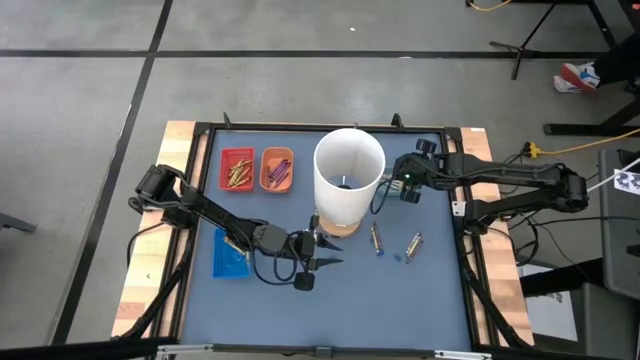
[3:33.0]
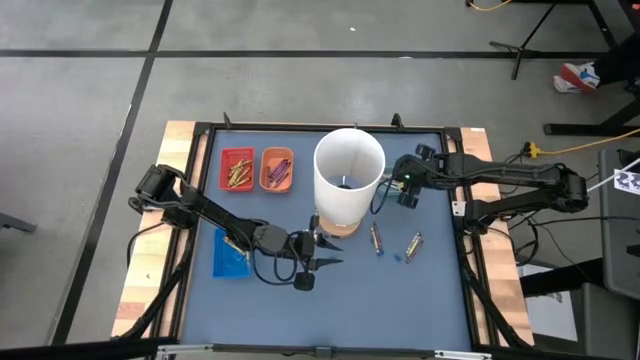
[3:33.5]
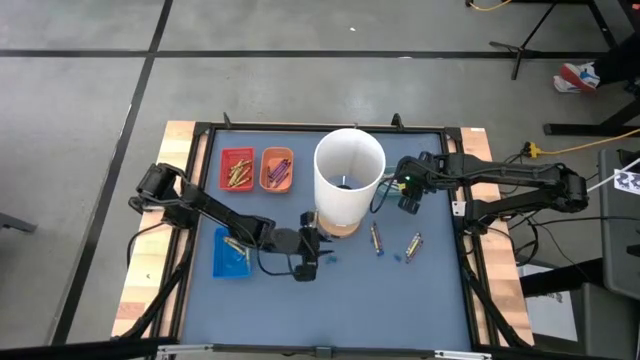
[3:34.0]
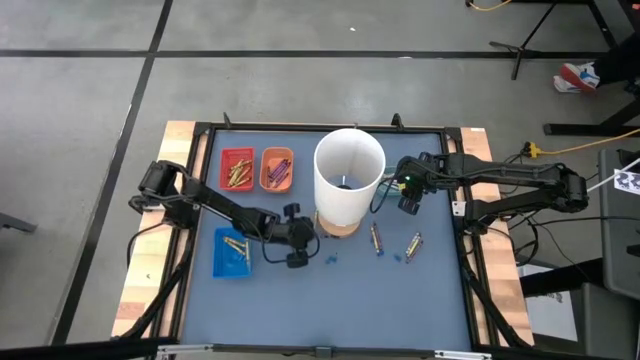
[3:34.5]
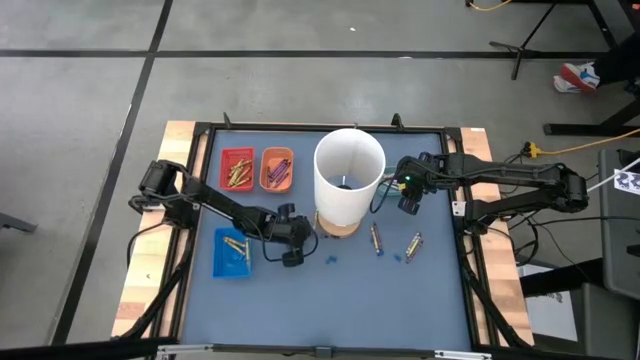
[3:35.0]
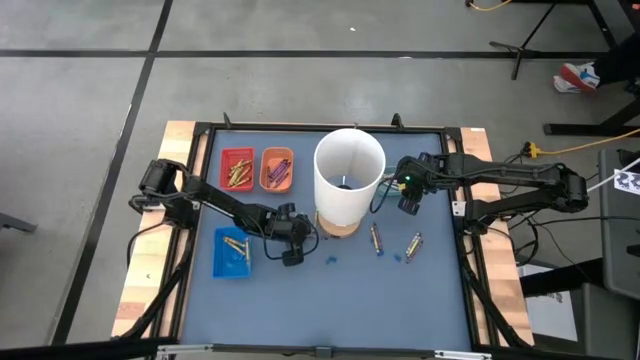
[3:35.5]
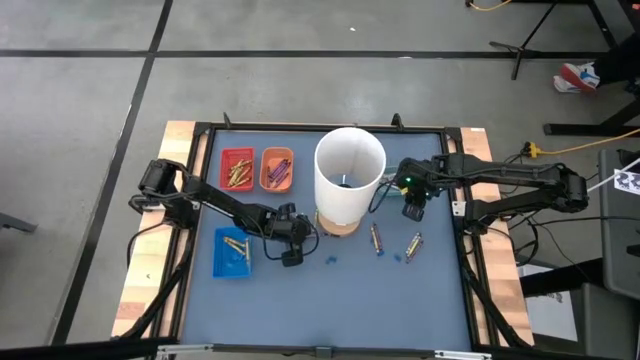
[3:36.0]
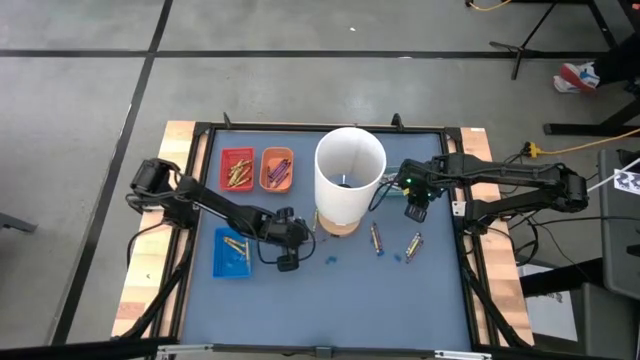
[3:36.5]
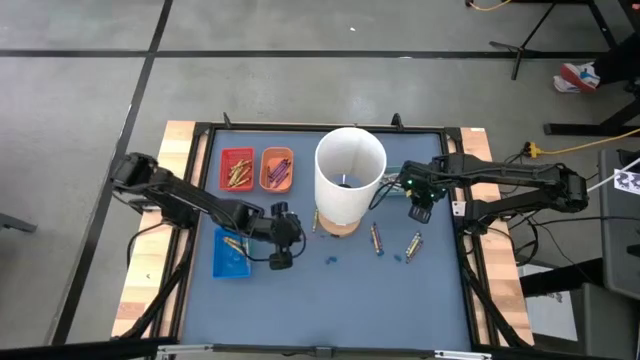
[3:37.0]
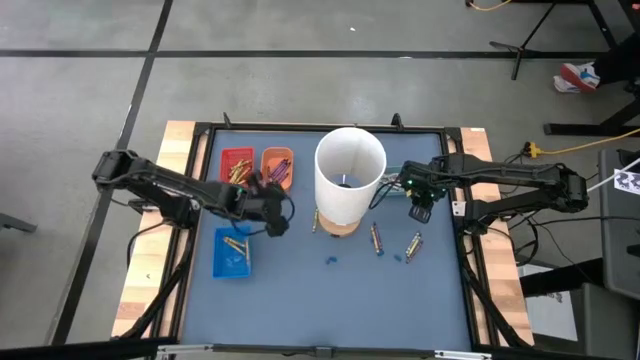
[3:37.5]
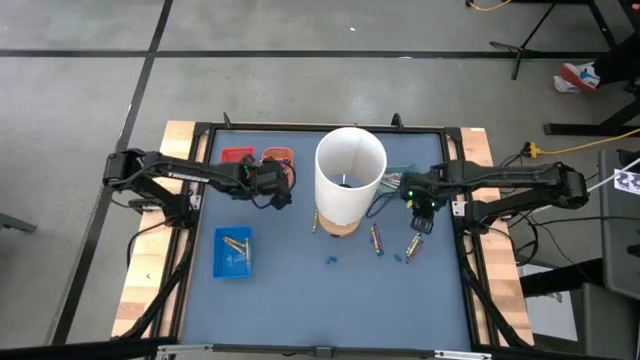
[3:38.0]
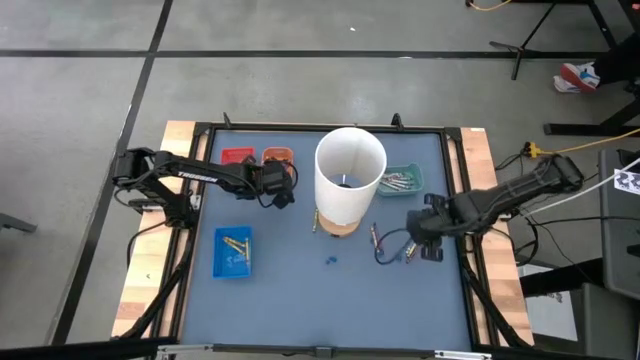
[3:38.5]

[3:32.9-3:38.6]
Task: Sort crayons
Put the violet crayon into the orange bin

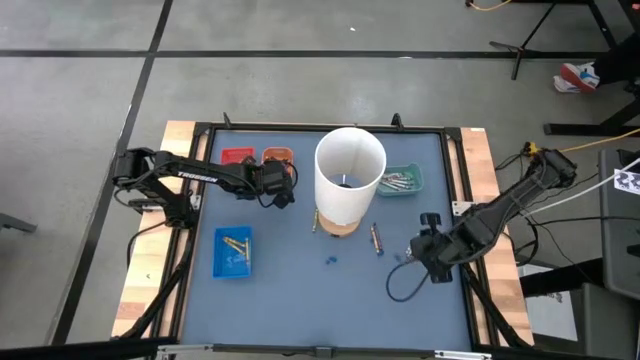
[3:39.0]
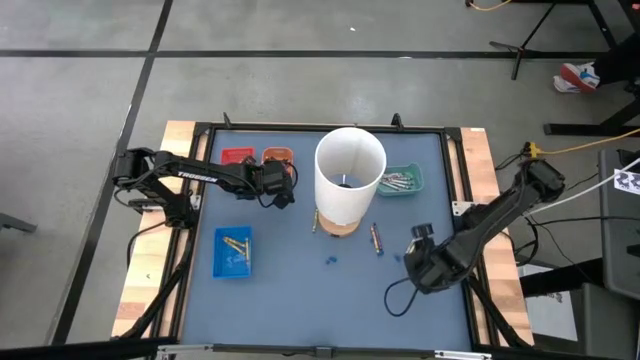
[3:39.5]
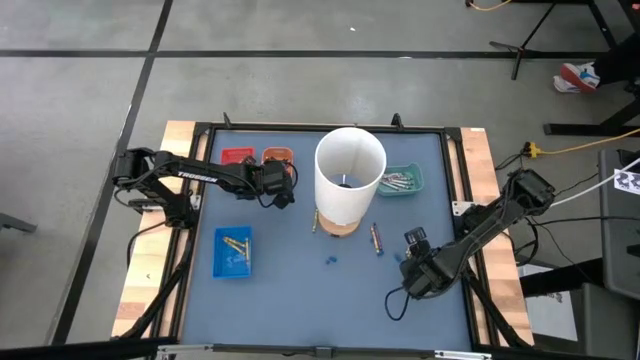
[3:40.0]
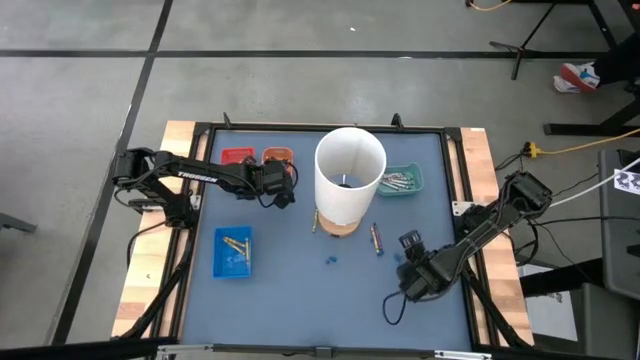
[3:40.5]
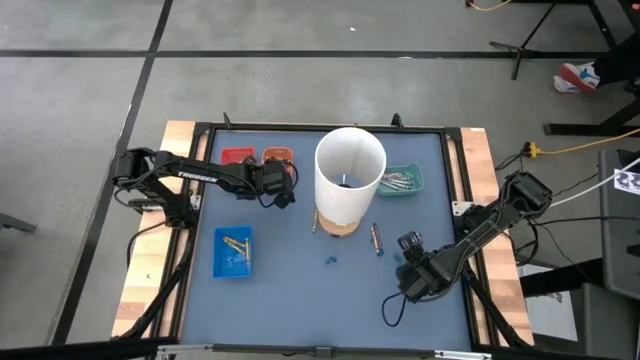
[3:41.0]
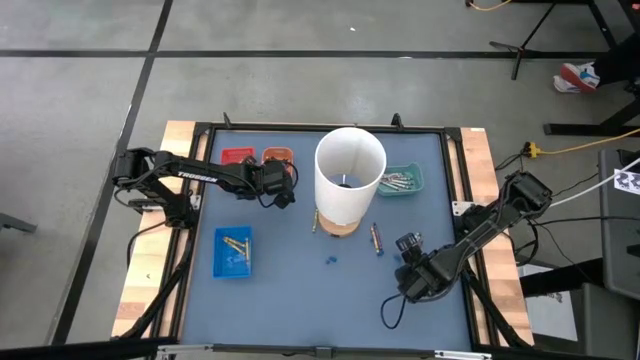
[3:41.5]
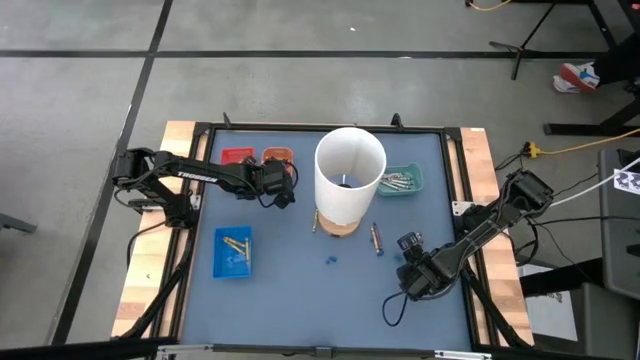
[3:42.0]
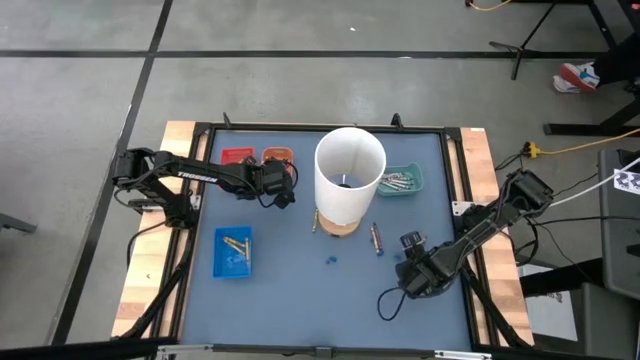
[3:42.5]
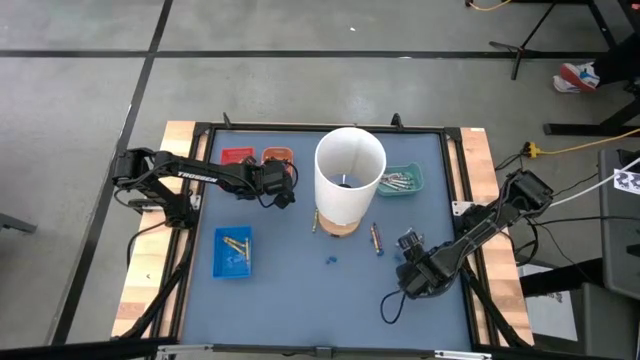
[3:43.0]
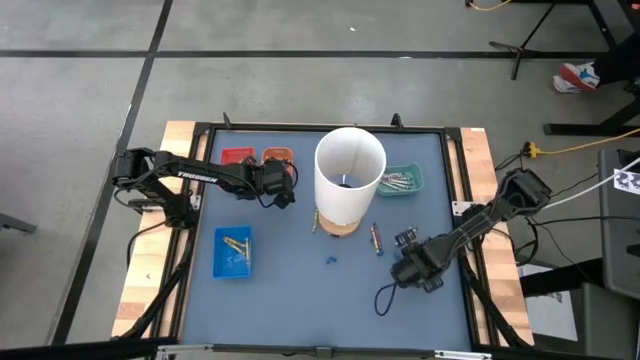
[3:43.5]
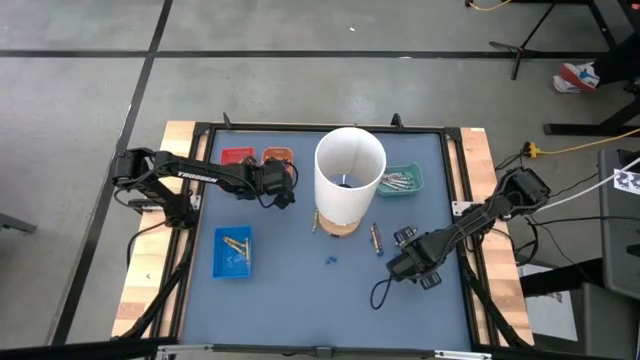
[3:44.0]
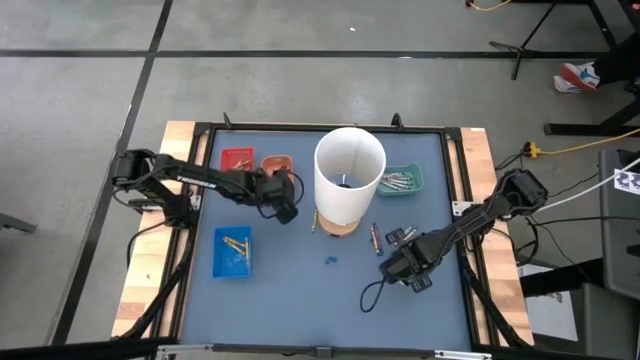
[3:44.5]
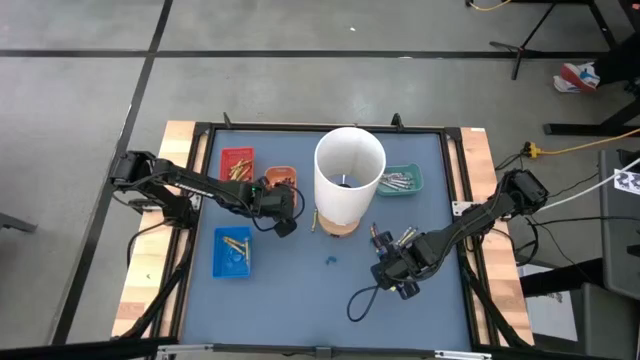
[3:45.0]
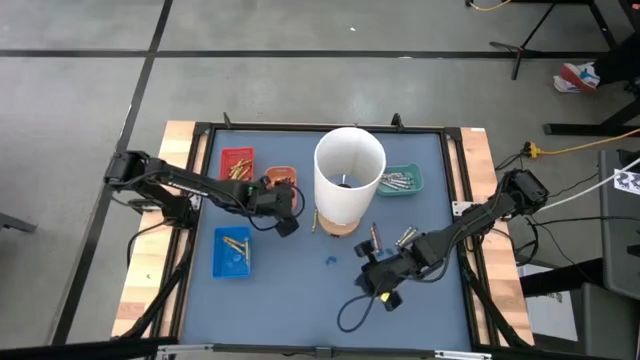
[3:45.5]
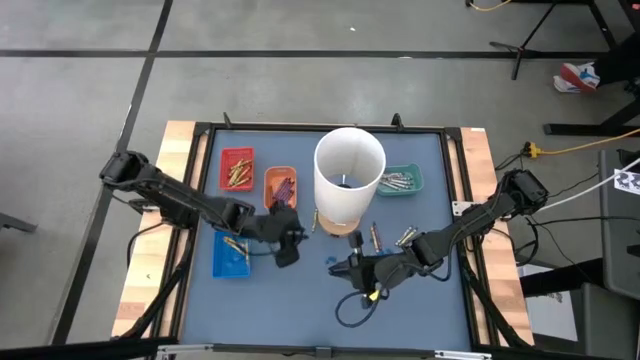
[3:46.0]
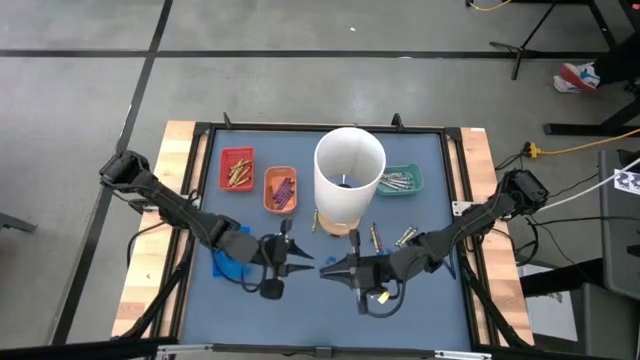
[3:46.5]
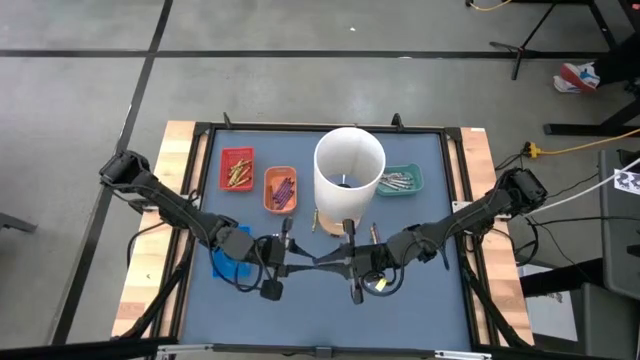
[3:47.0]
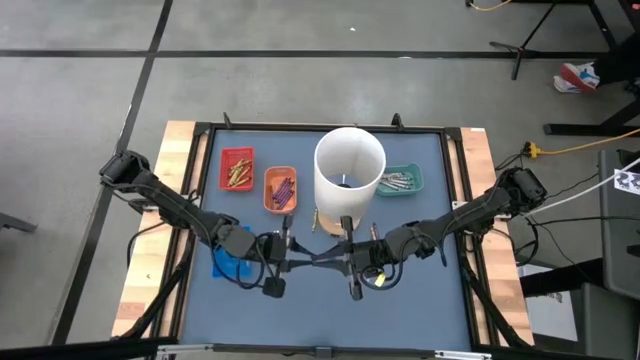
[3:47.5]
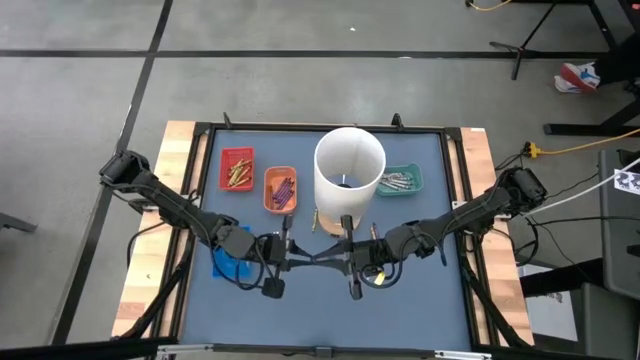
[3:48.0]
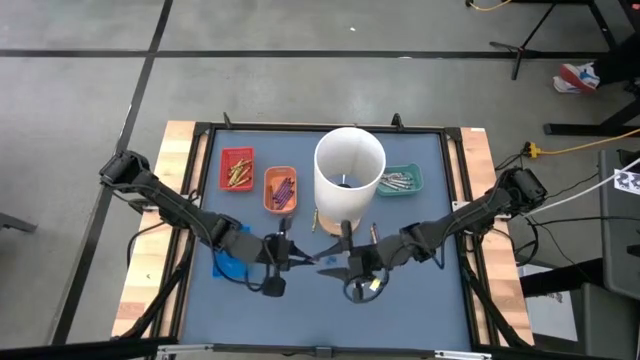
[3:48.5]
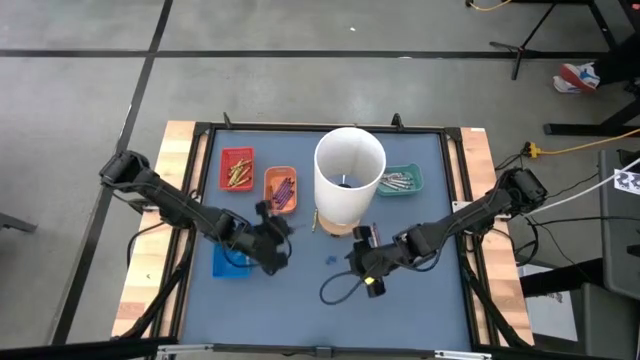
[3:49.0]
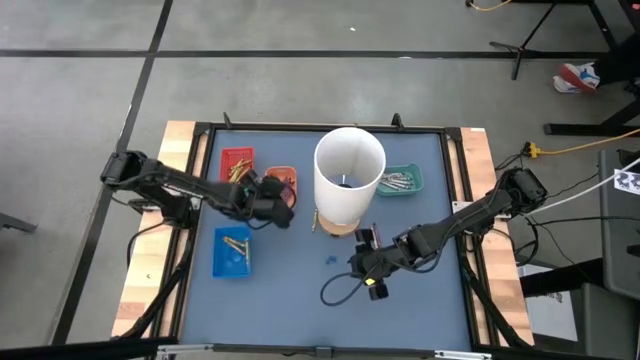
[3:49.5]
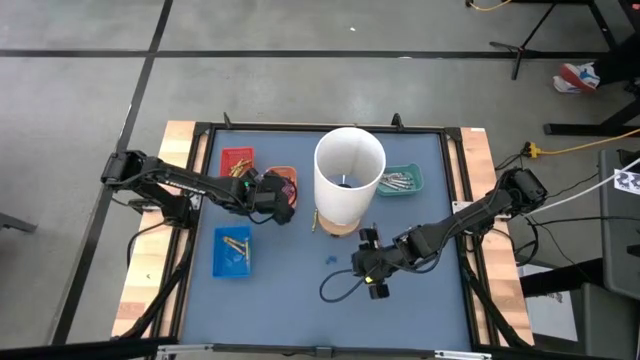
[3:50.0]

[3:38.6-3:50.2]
Put the violet crayon into the orange bin

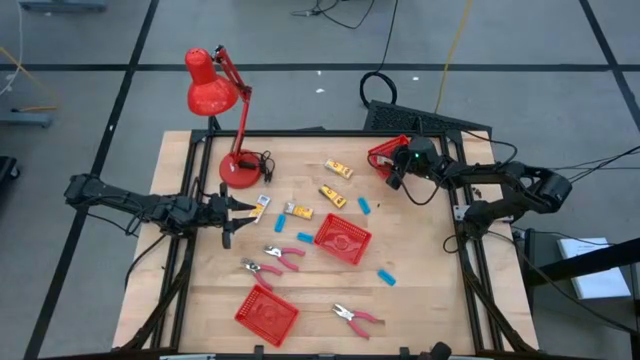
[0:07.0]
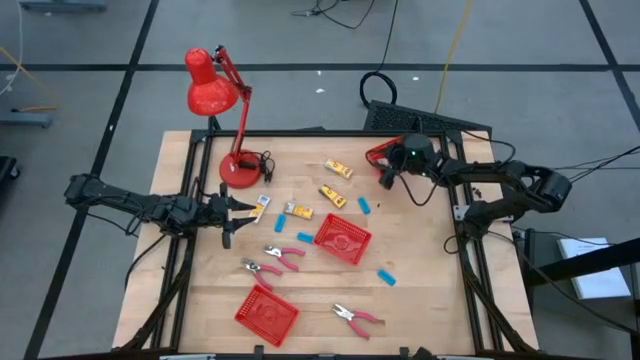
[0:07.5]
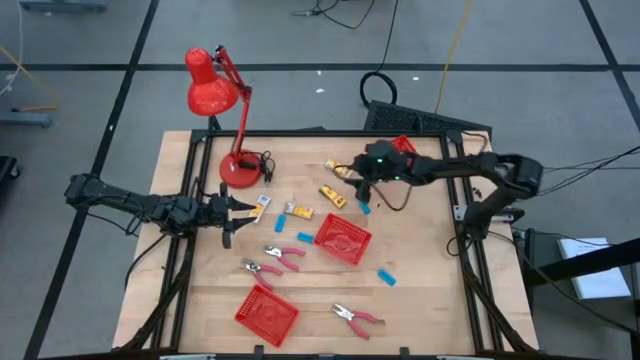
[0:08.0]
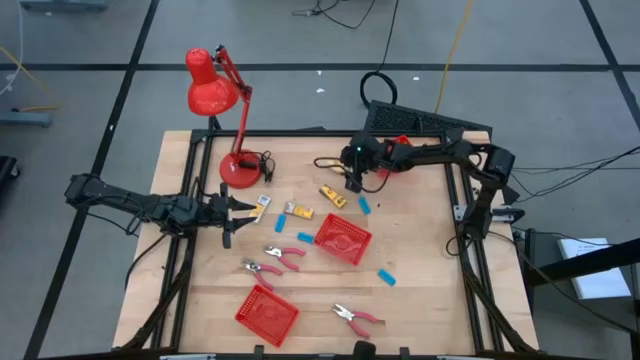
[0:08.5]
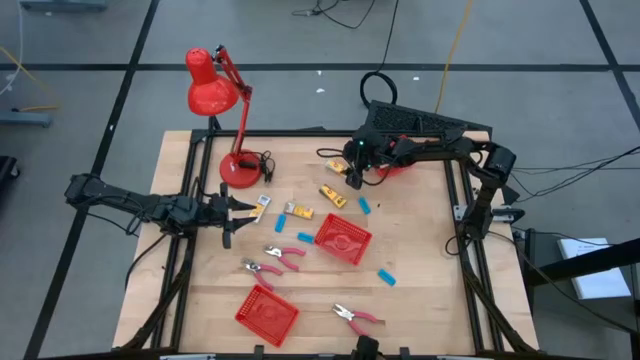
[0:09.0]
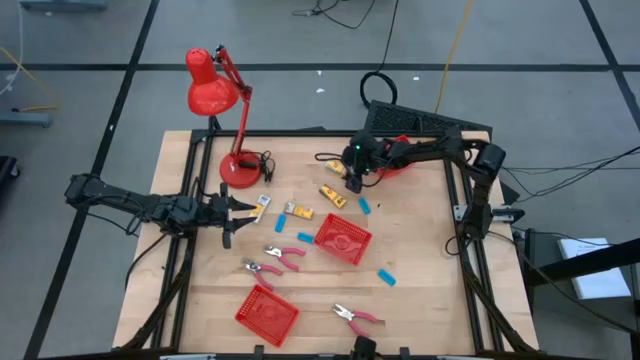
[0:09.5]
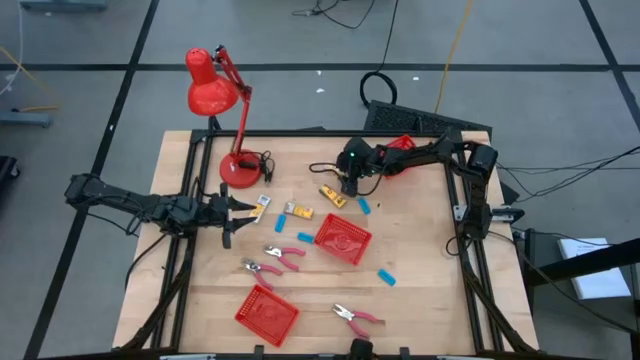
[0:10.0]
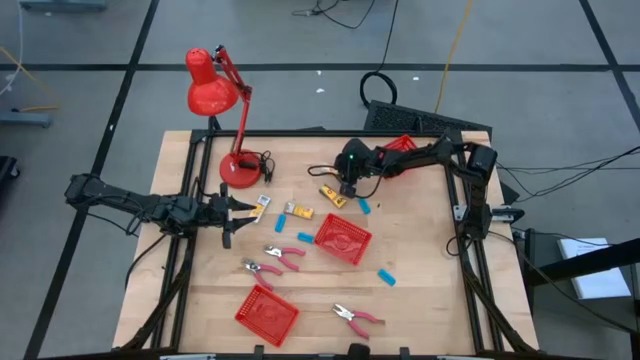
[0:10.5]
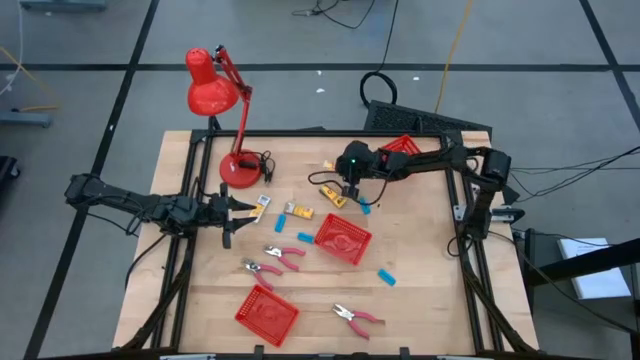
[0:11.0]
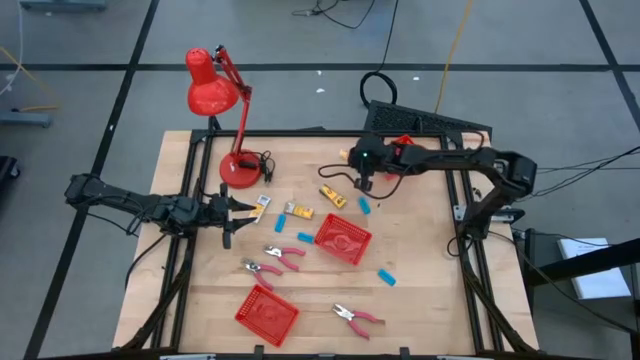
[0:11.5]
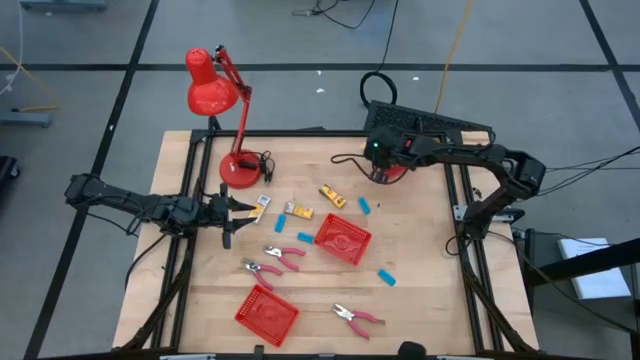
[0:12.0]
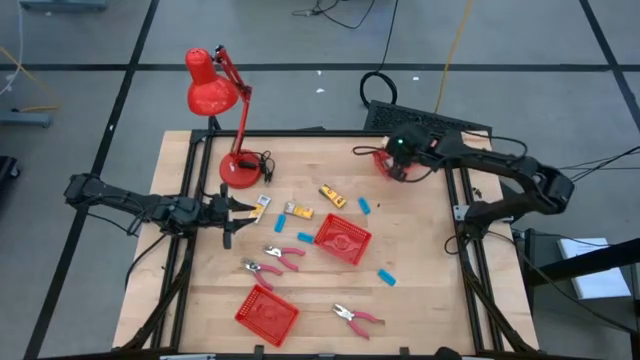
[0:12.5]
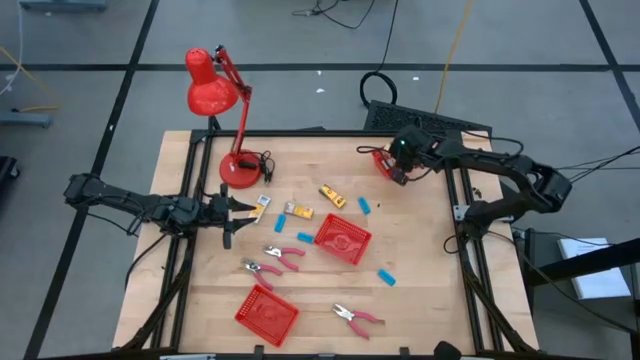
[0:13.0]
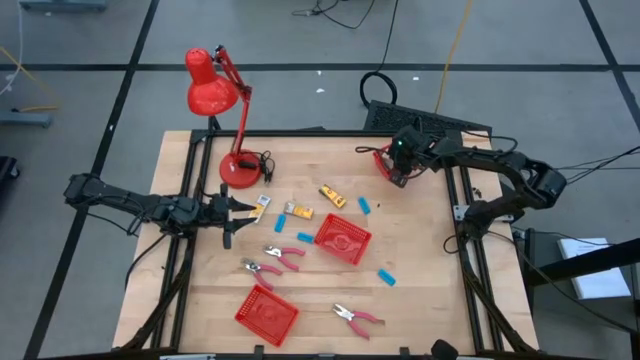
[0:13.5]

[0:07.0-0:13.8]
Task: Pick & Place School Supplies
Put the yellow crayon box into the top red bin
